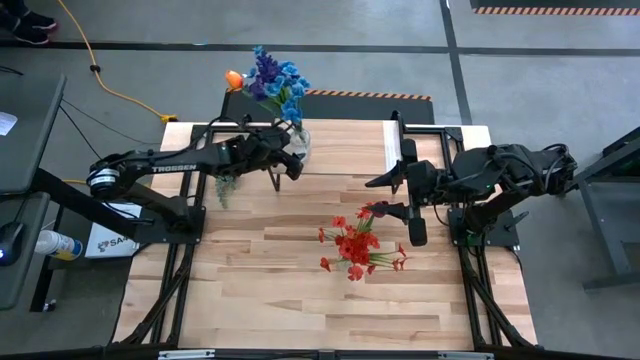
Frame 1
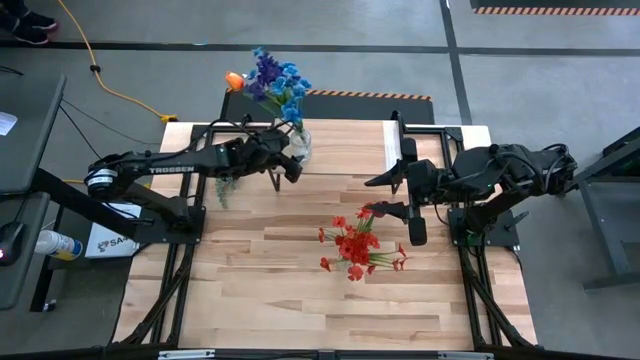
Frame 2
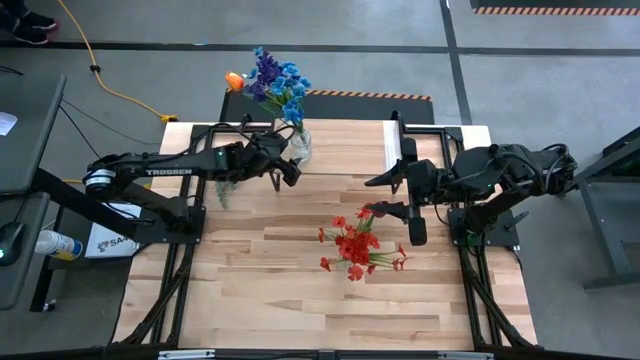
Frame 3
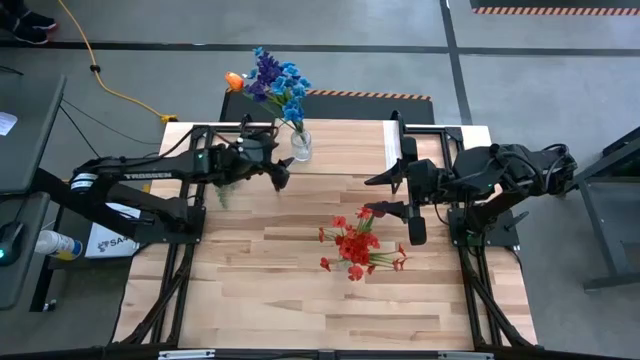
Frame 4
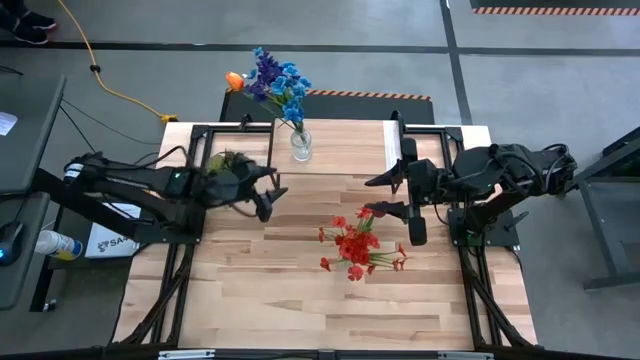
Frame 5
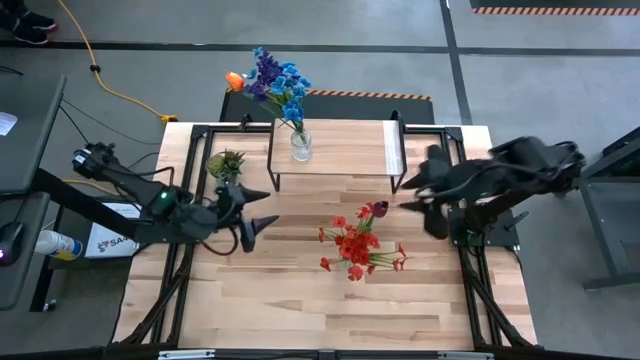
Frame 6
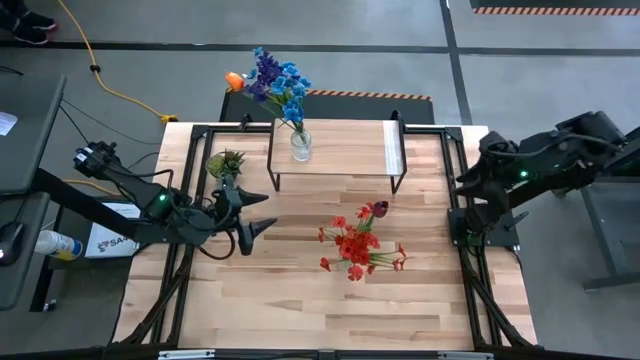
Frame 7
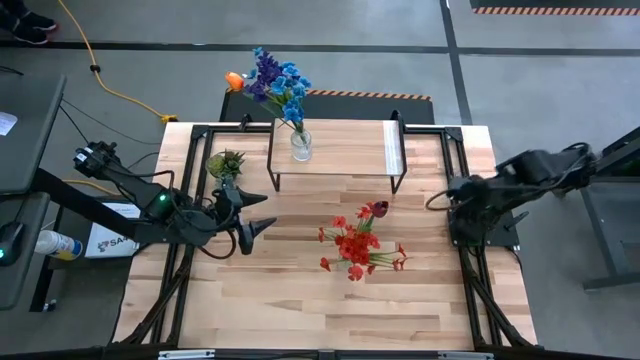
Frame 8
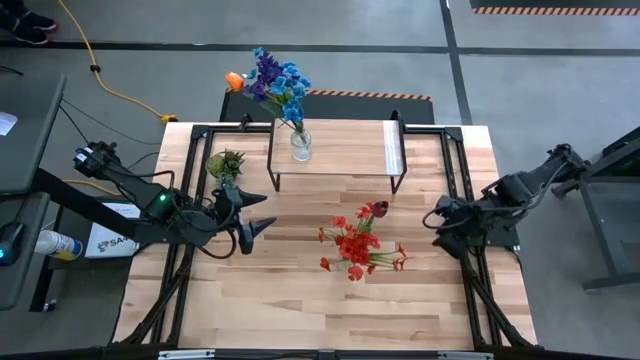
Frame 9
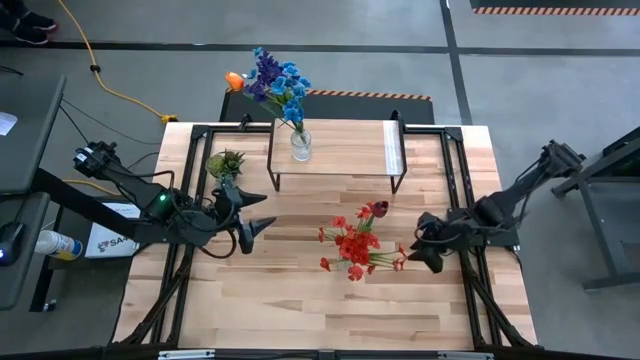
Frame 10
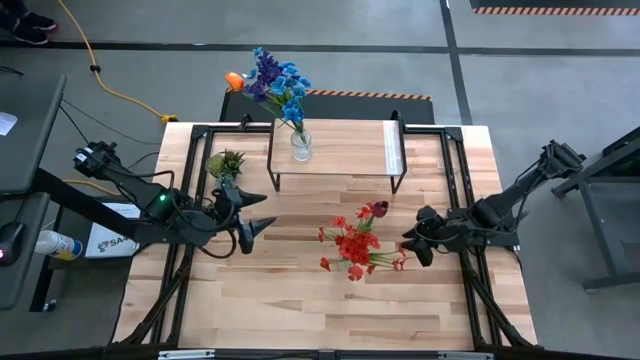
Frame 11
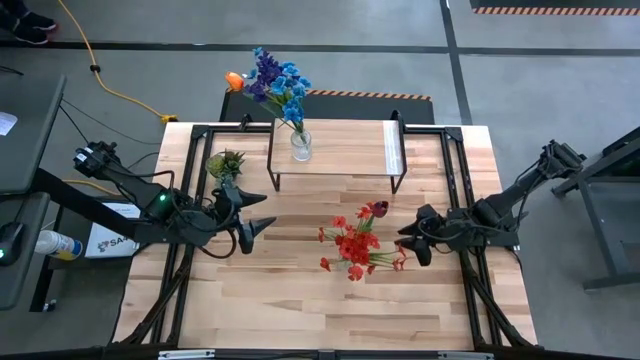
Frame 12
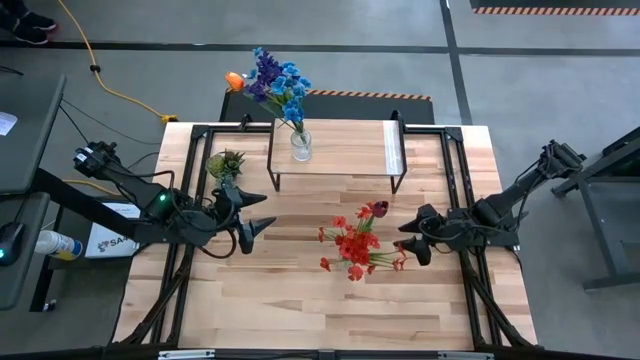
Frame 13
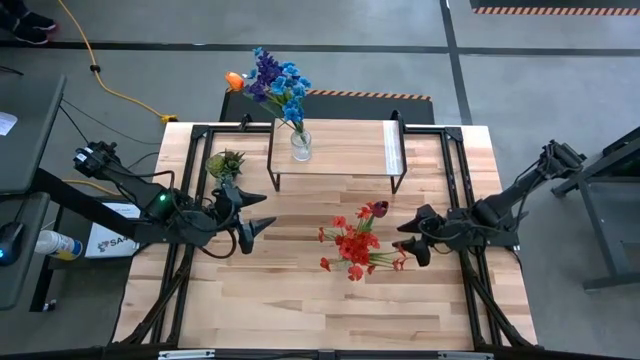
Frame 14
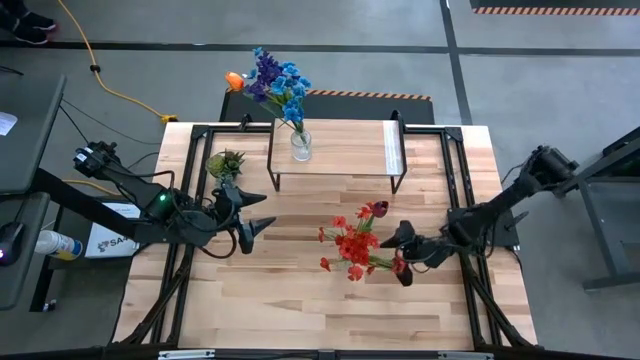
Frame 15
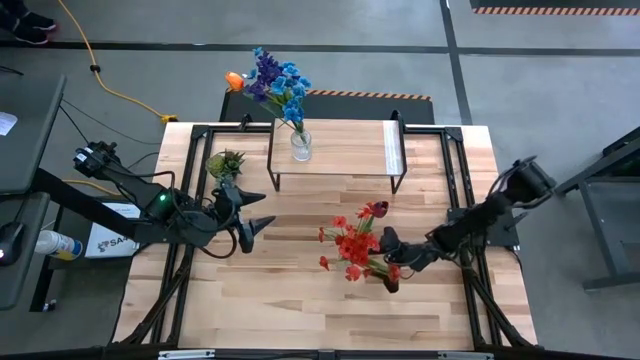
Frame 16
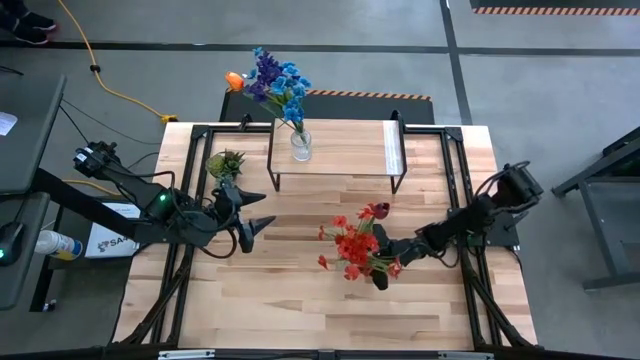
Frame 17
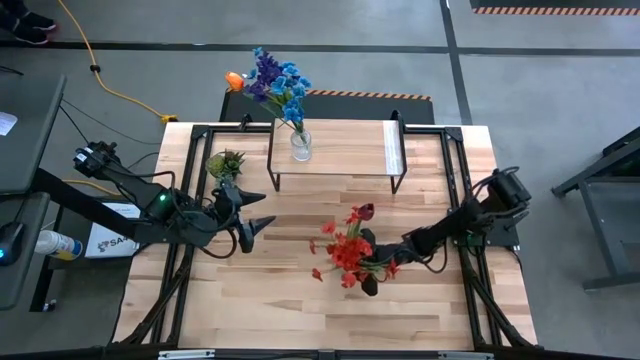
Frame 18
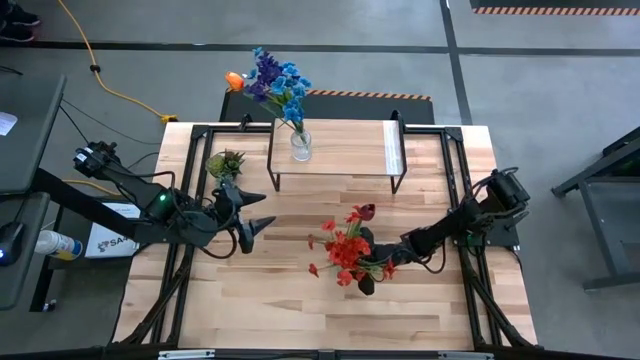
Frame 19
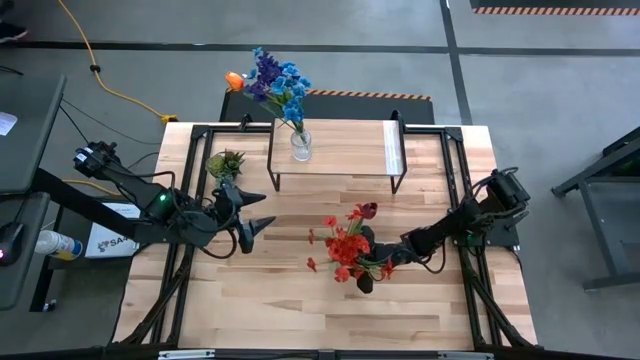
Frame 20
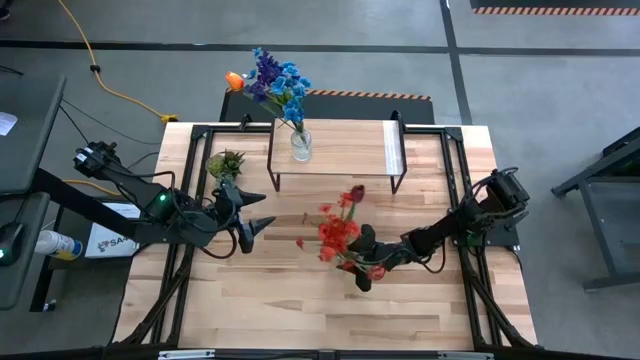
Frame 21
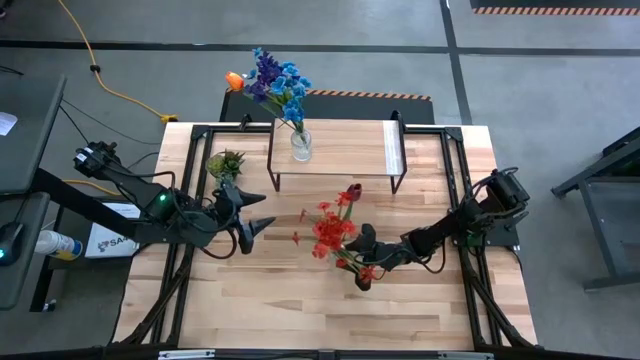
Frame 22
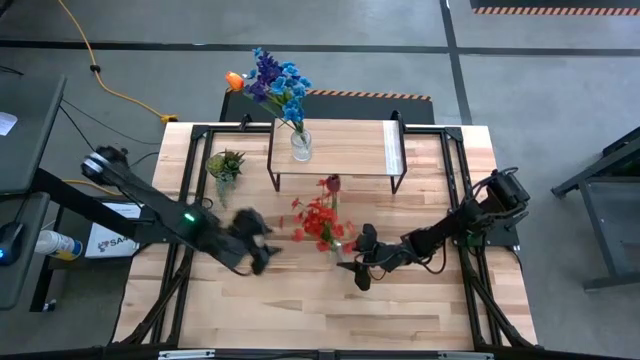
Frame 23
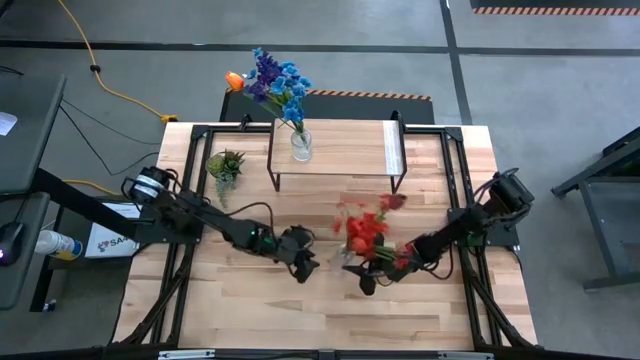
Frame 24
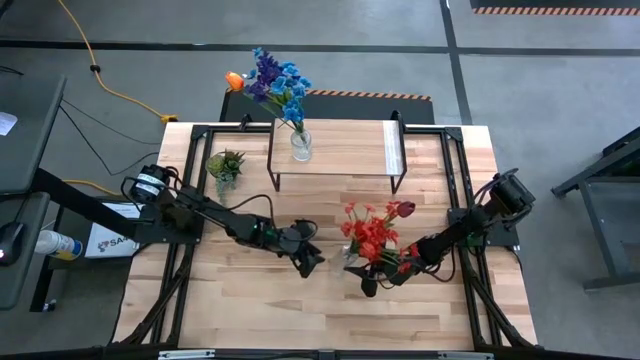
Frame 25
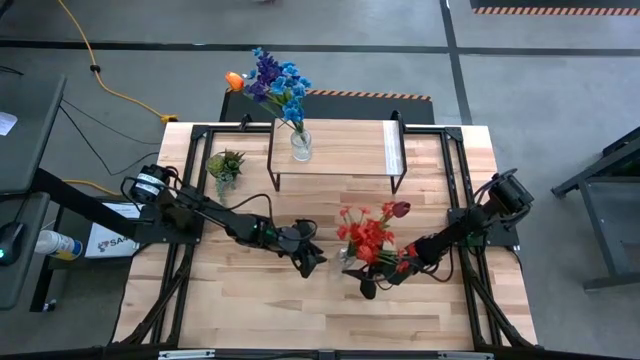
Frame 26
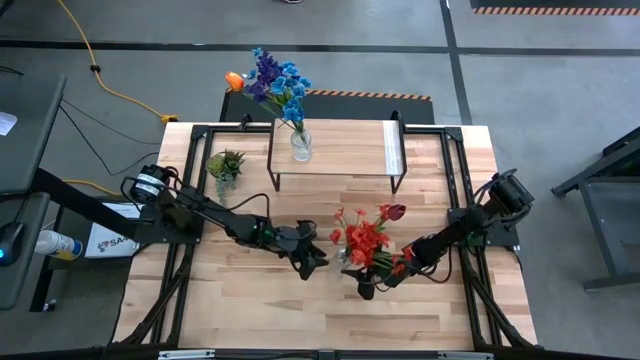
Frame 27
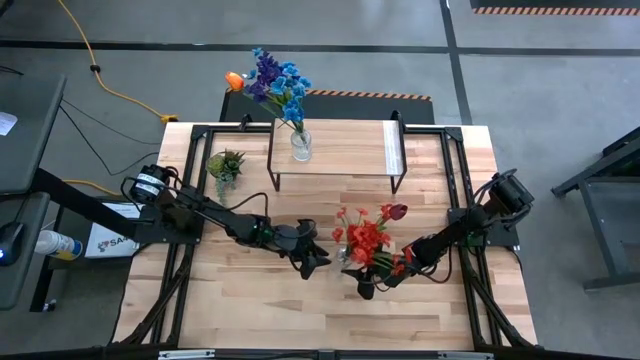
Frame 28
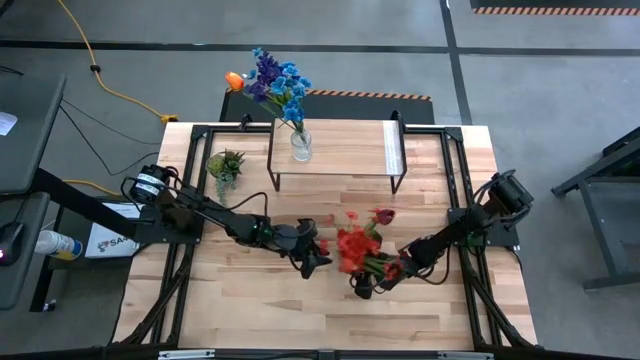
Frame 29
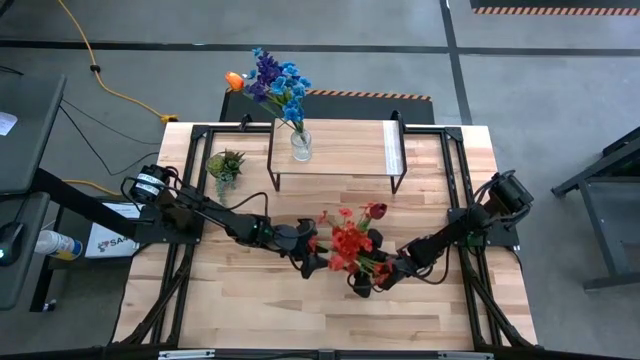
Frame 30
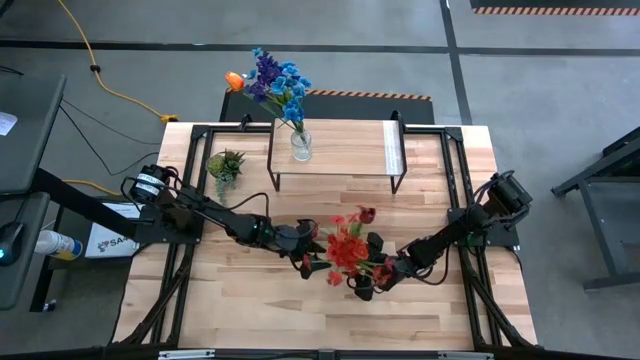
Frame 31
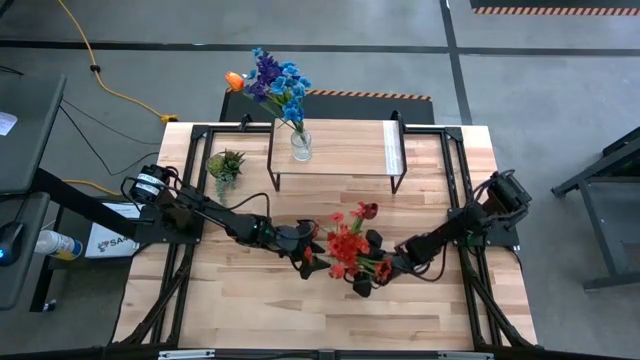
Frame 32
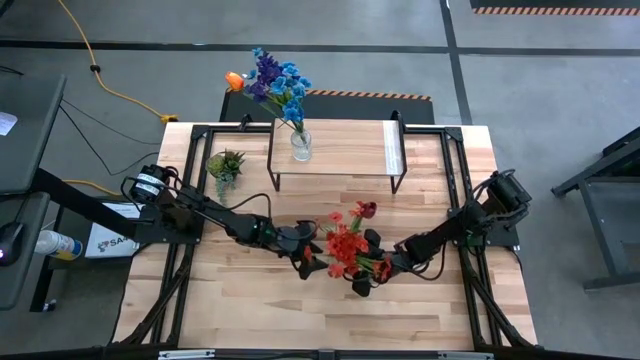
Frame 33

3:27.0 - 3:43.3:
Task: Pick and place flowers into a vace then onto a shelf
Put the transparent vase with flowers on the shelf

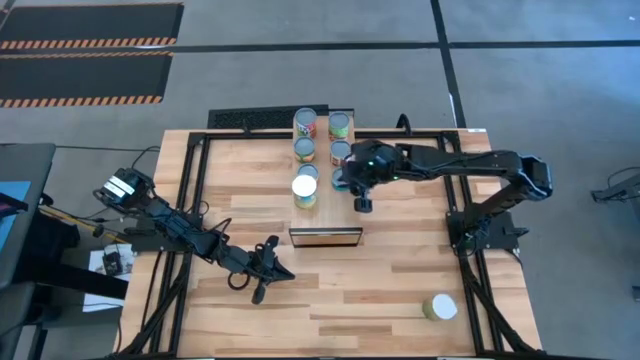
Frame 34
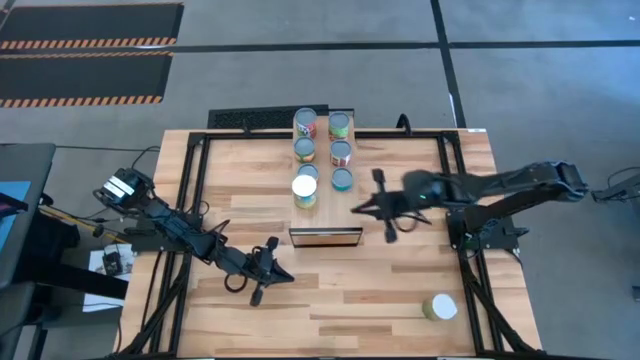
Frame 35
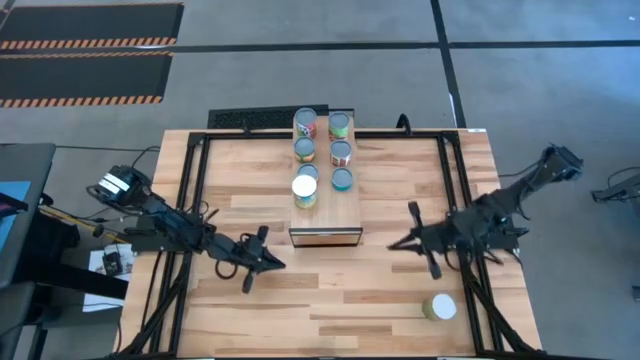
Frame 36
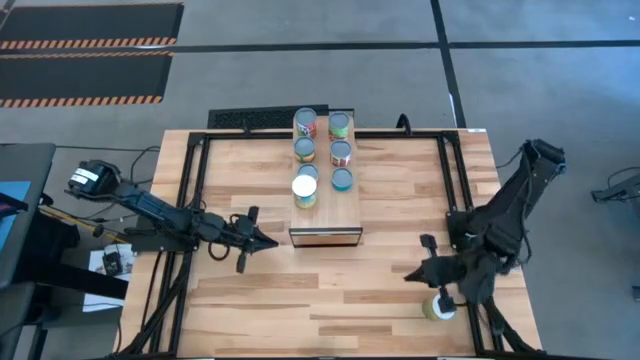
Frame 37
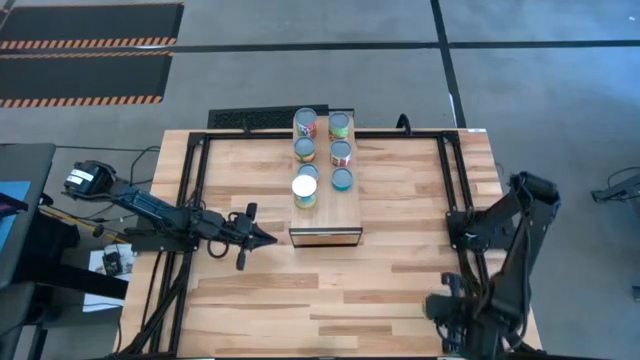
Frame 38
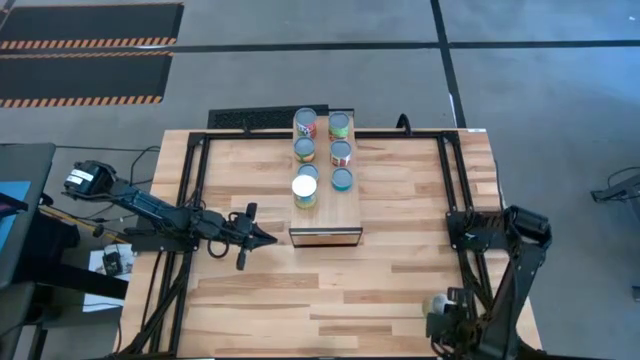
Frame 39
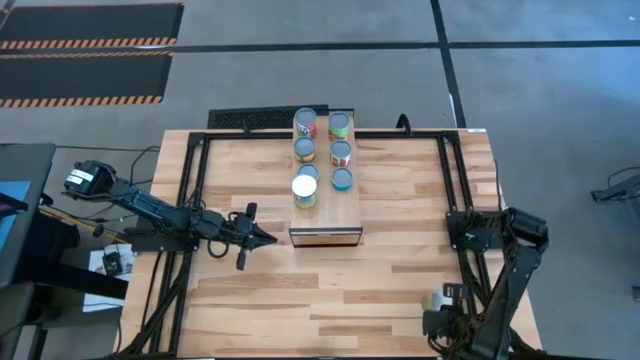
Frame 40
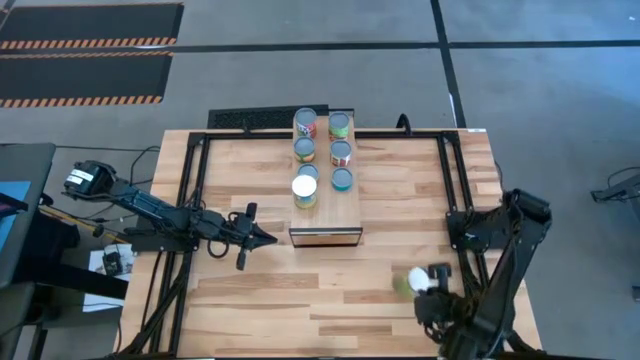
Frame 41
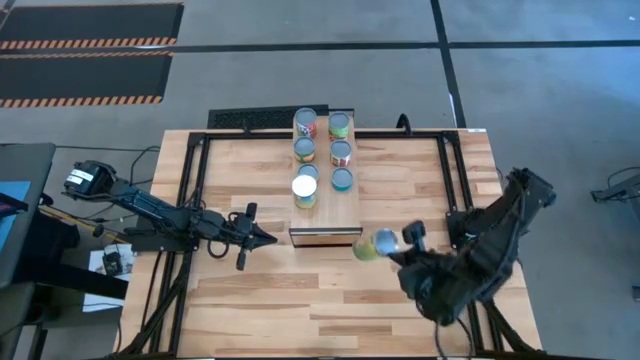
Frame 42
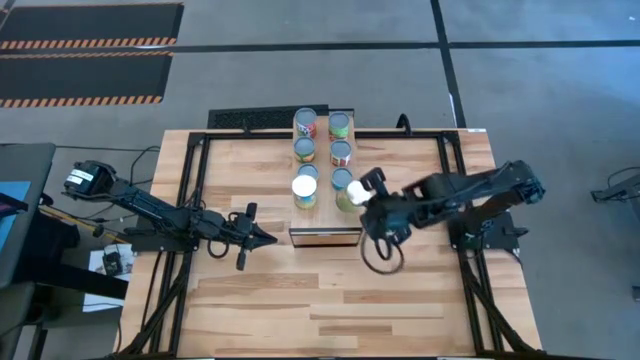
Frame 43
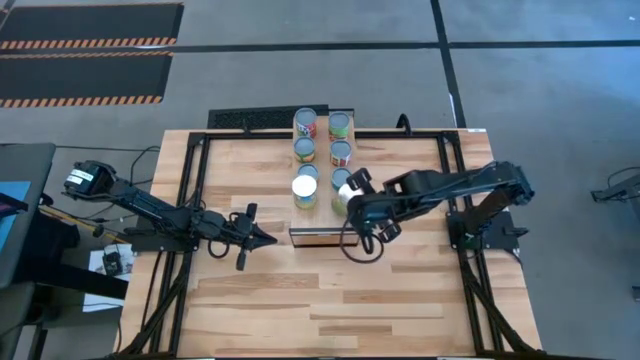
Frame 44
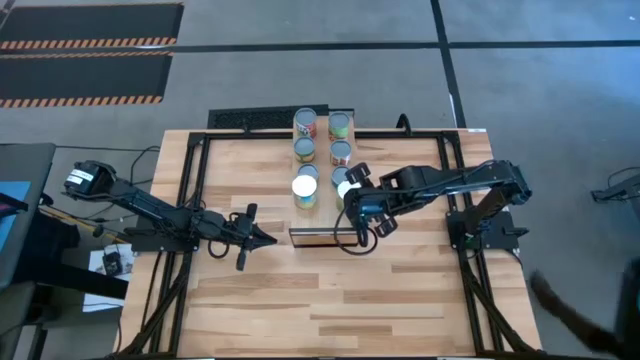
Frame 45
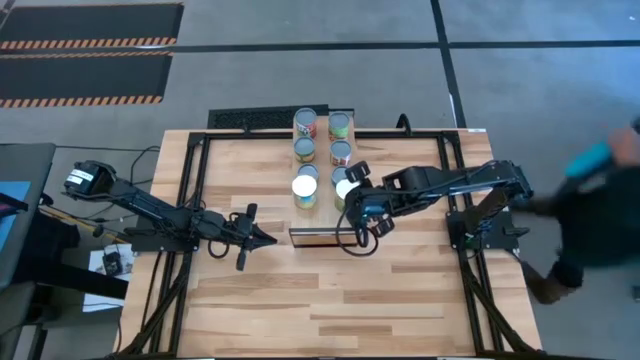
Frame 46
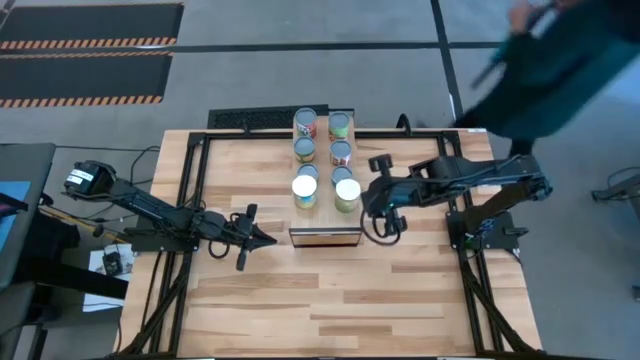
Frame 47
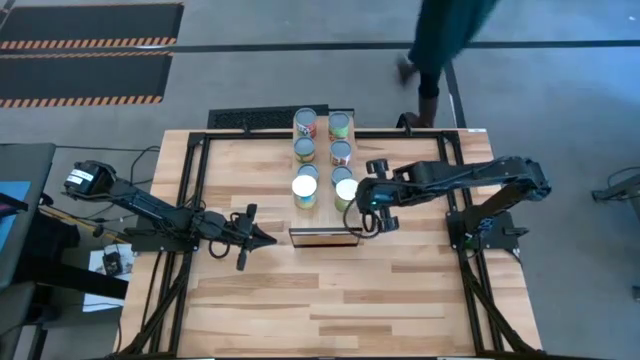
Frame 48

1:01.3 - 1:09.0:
Task: Pick and place cans onto a shelf
Put the canned oranges on the shelf aligned with other cans
